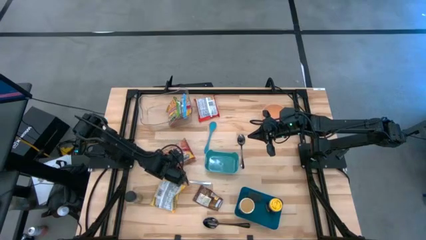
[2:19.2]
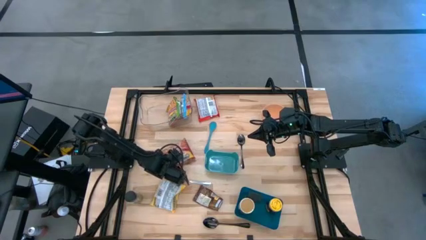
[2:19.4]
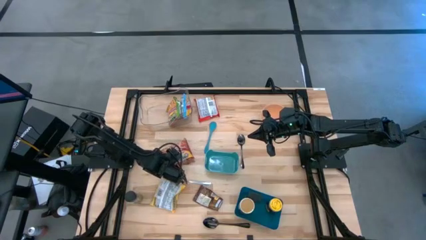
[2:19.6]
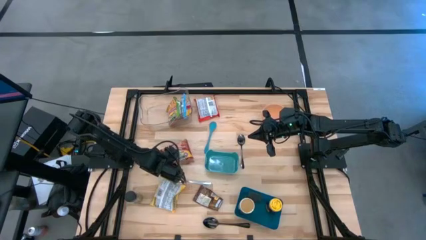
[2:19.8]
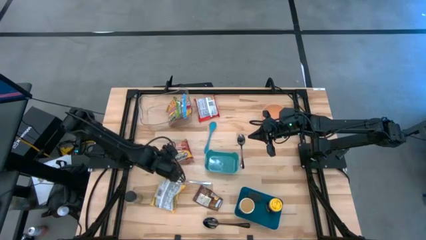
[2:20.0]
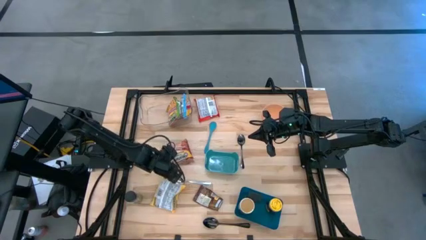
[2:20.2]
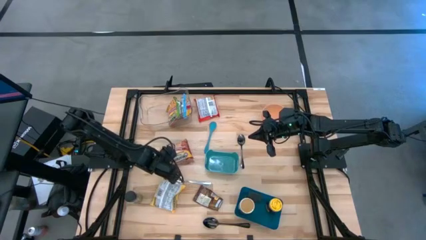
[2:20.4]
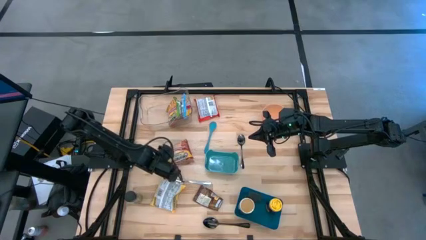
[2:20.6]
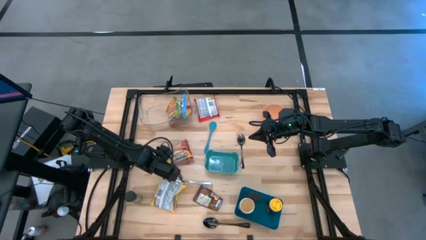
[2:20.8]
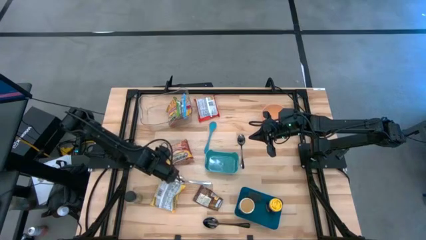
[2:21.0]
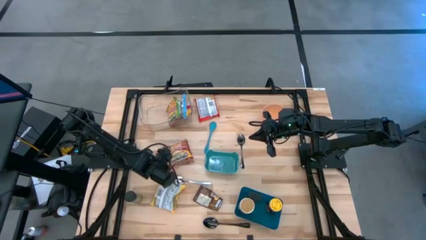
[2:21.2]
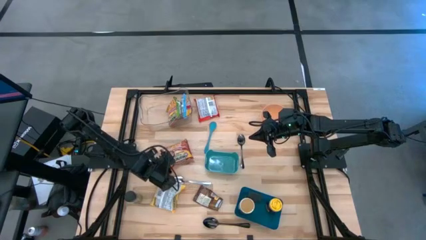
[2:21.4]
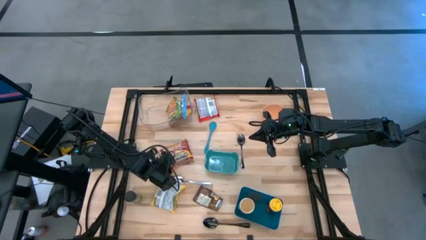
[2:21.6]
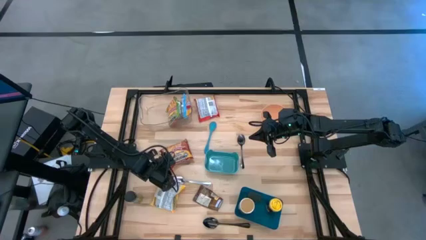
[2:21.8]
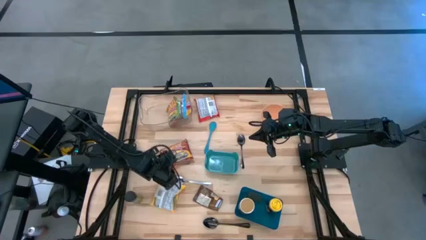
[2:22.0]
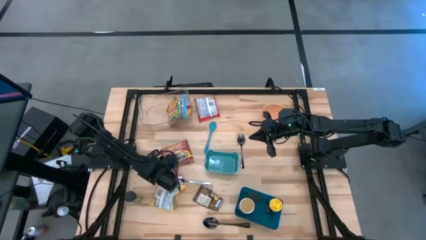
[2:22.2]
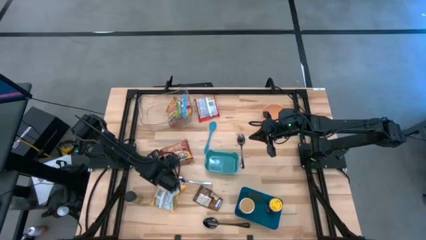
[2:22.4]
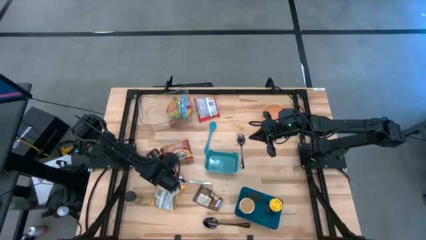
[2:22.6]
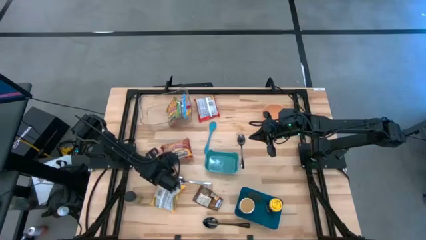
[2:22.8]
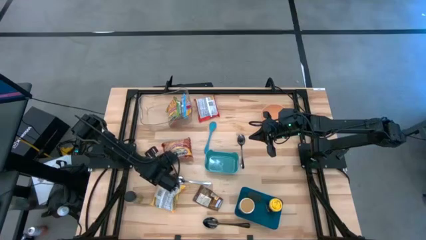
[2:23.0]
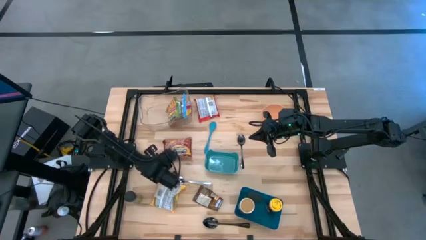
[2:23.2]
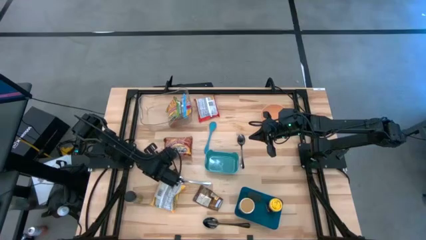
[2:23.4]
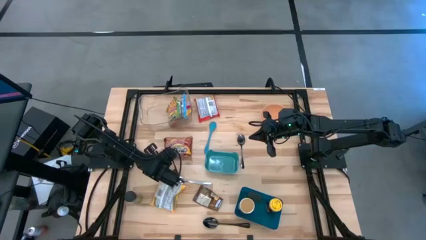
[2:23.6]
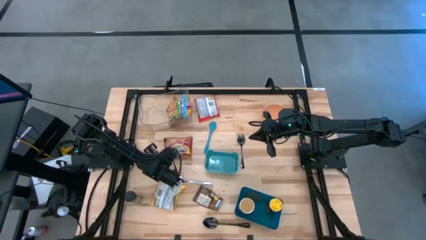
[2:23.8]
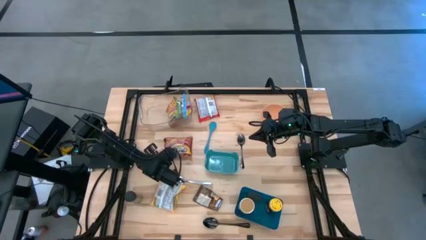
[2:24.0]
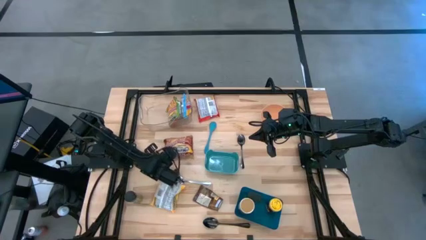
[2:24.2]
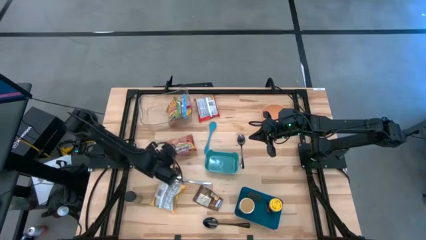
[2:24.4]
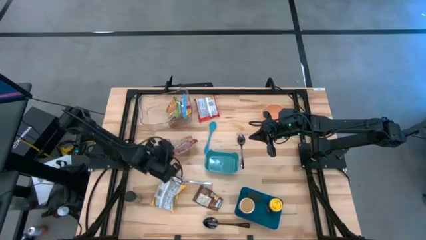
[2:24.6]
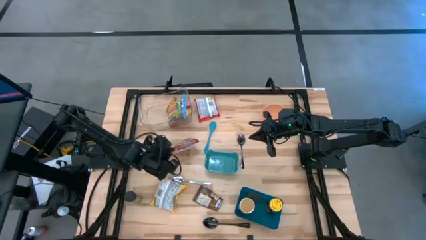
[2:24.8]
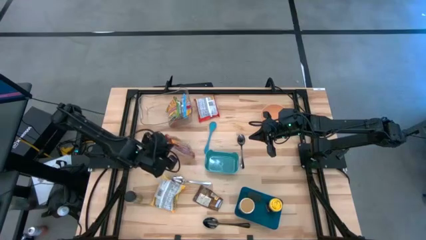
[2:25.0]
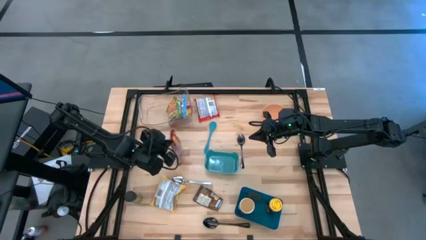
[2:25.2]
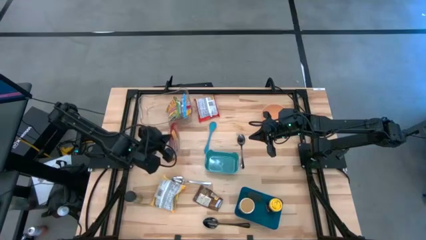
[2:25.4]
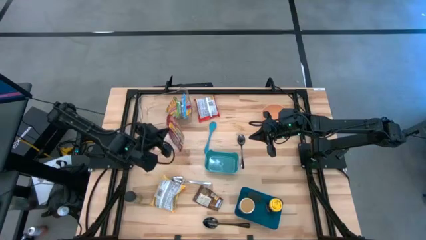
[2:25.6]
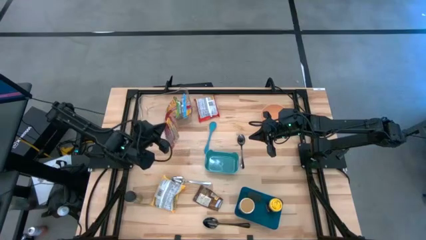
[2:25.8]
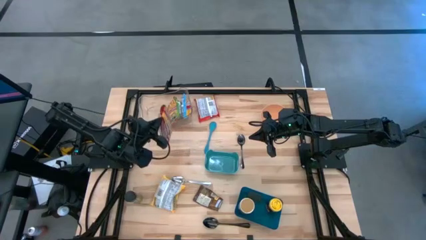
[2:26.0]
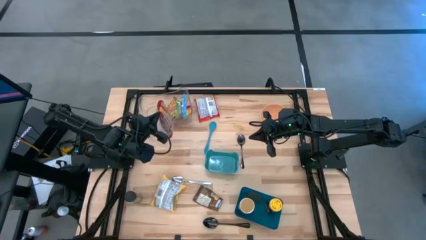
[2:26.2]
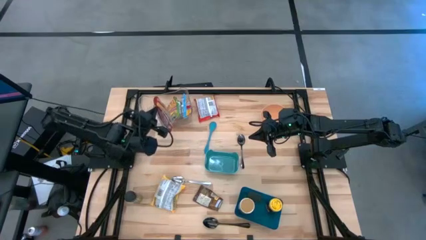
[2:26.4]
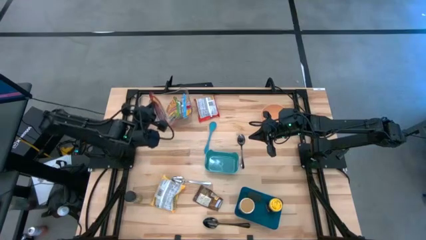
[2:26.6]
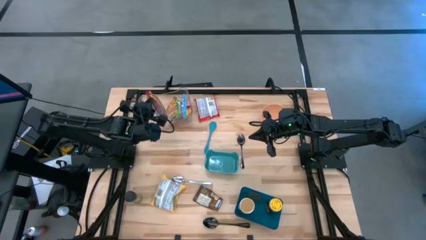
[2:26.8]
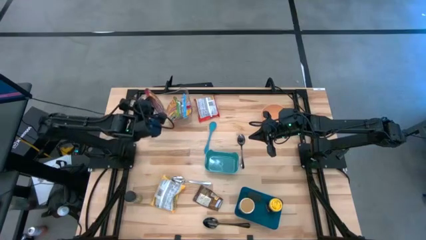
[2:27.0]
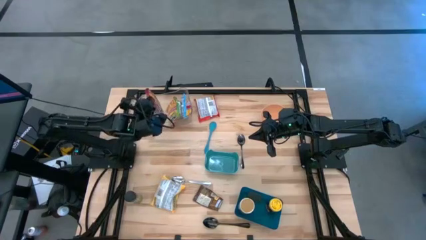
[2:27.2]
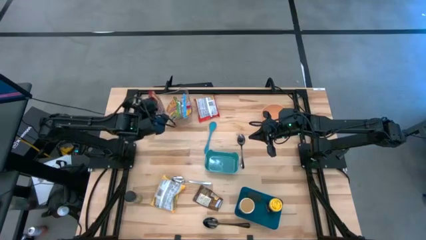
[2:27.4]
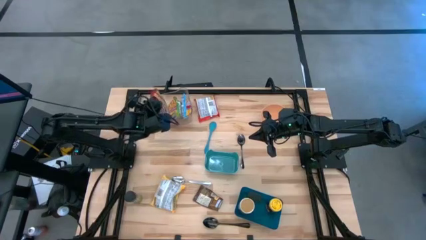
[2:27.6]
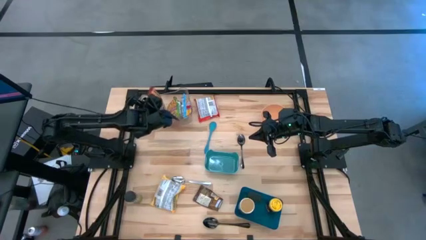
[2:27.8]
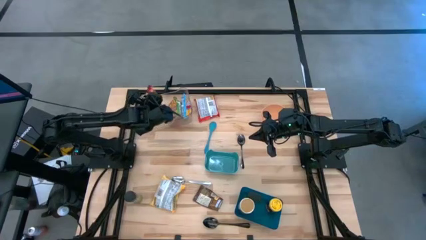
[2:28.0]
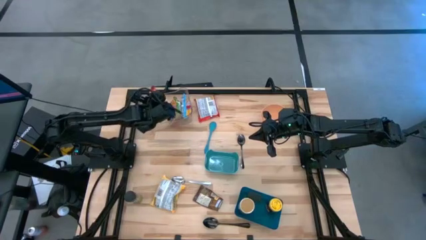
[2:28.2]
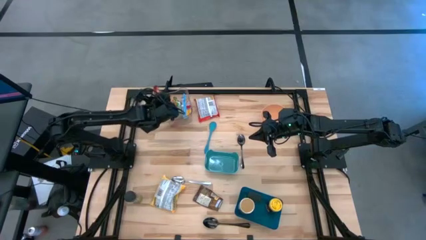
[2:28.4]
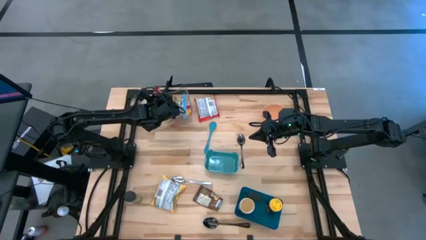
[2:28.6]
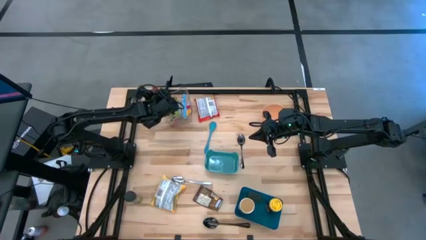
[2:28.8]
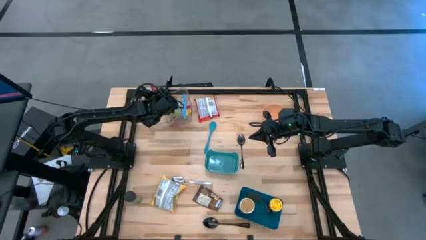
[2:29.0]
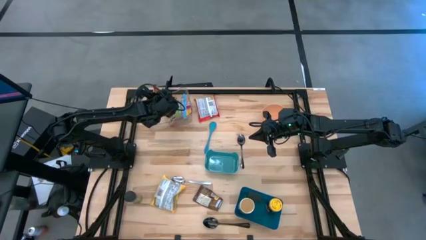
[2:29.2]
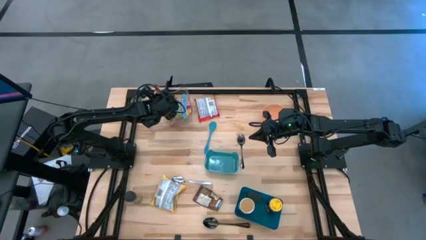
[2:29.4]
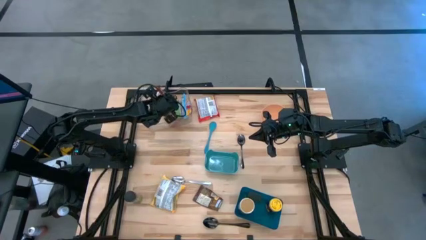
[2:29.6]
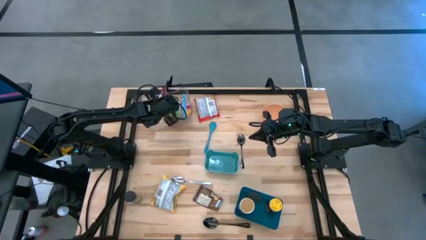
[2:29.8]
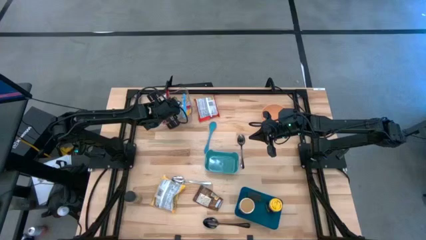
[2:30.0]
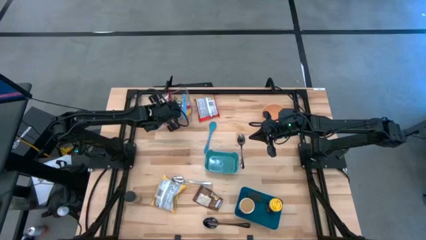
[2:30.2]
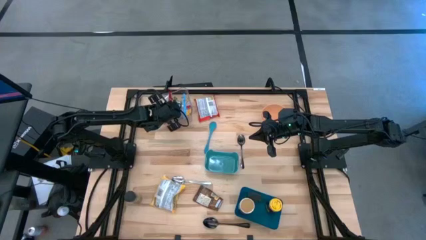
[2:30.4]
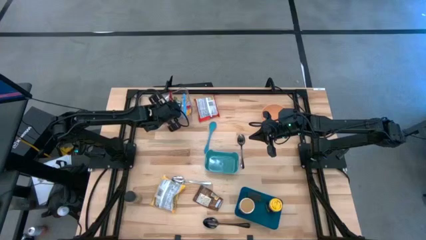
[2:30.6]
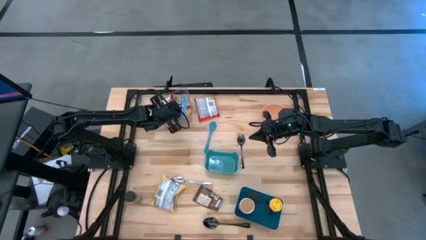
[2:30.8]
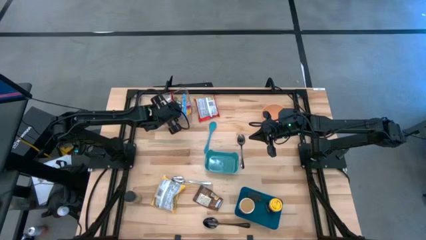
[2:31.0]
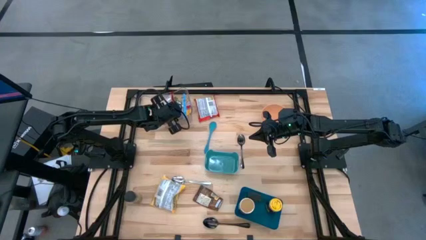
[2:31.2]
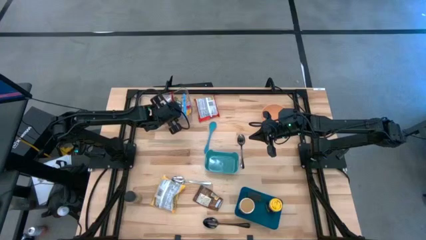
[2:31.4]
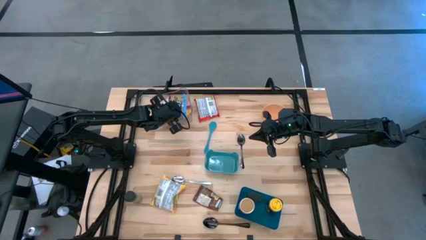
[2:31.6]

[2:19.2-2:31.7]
Task: Pick & Place Food Item
Put the dark red noodle pack into the transparent bin
